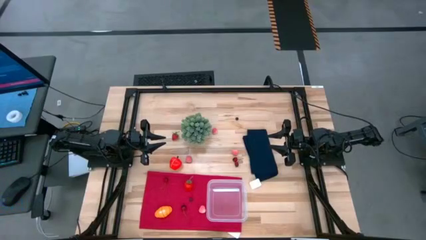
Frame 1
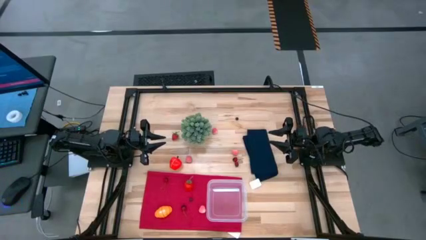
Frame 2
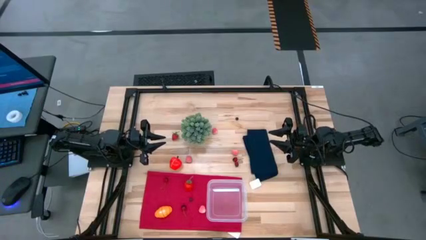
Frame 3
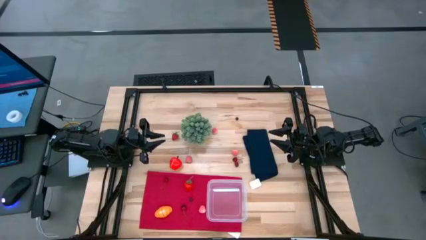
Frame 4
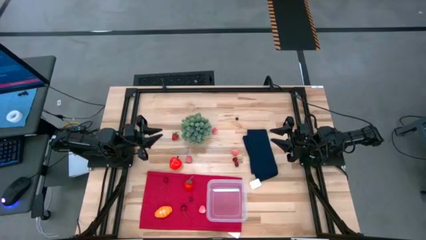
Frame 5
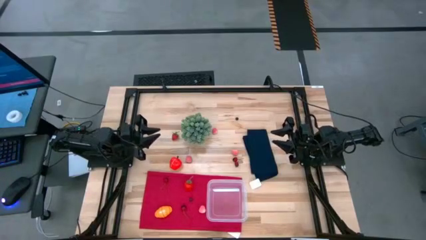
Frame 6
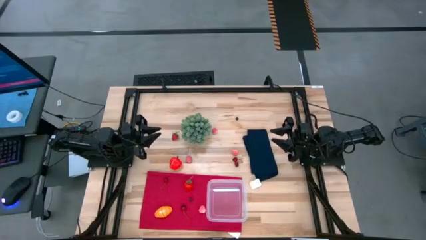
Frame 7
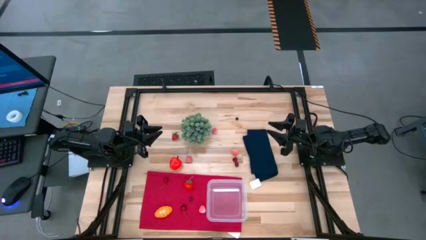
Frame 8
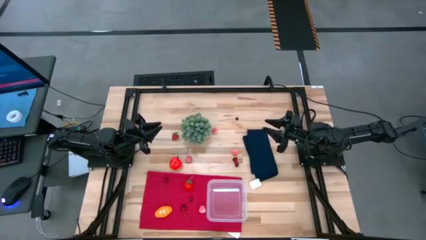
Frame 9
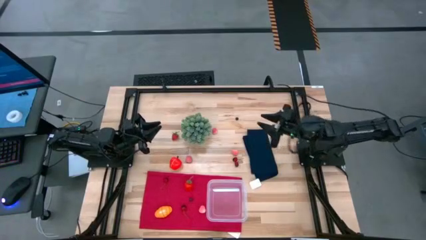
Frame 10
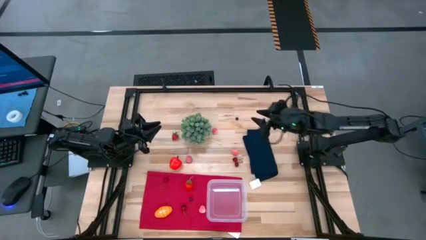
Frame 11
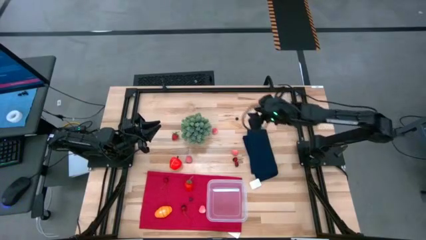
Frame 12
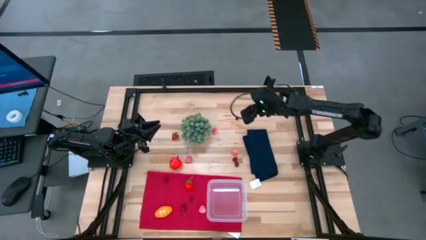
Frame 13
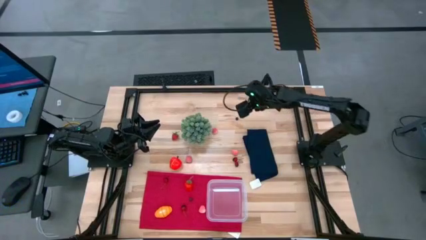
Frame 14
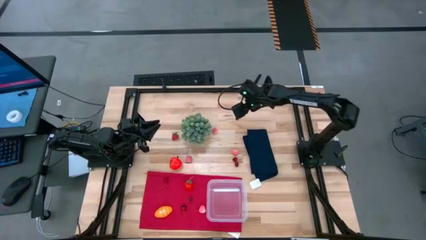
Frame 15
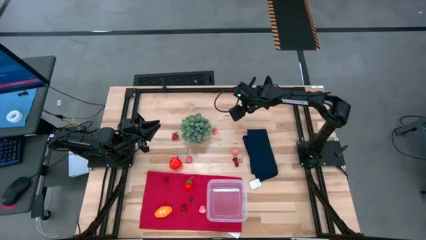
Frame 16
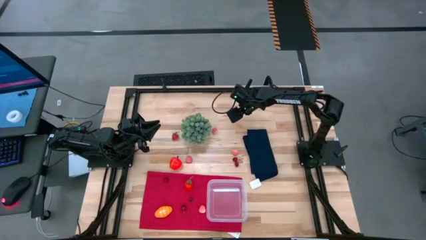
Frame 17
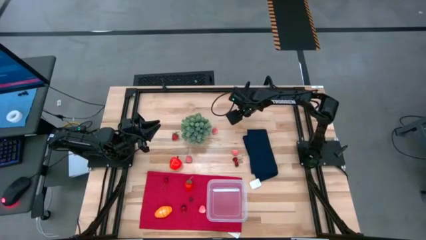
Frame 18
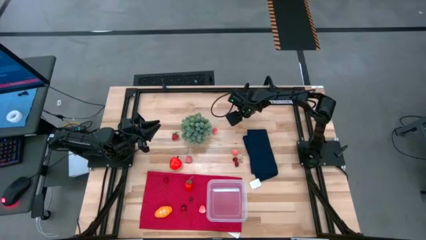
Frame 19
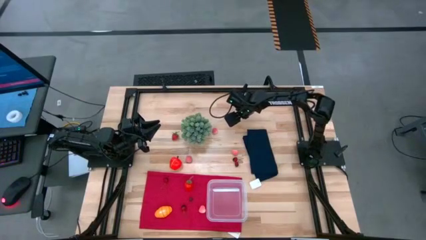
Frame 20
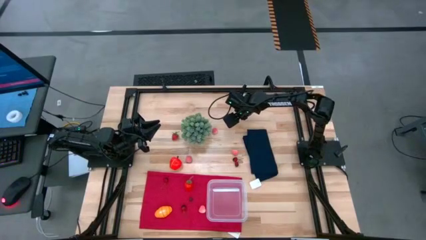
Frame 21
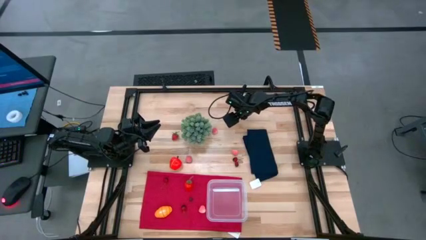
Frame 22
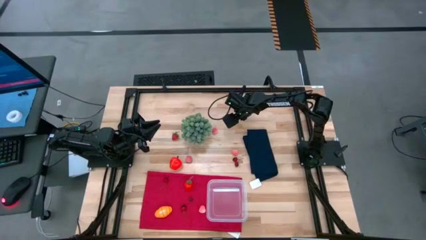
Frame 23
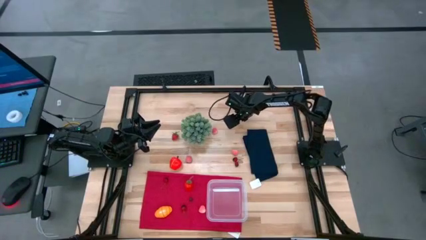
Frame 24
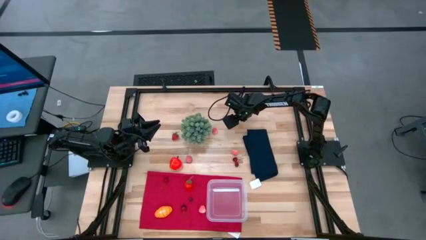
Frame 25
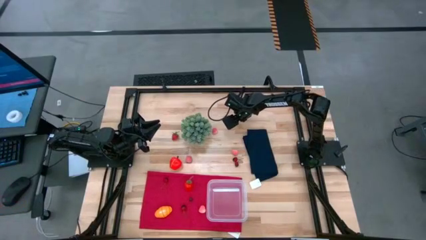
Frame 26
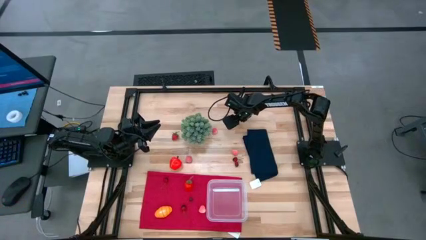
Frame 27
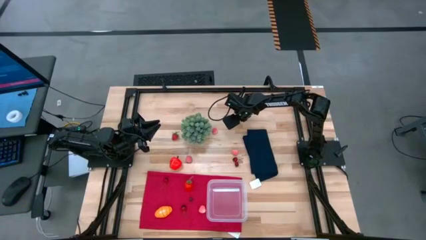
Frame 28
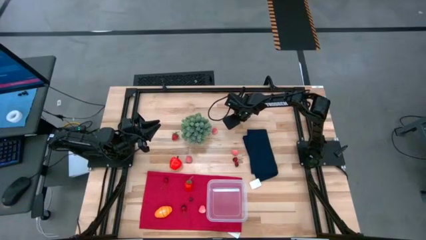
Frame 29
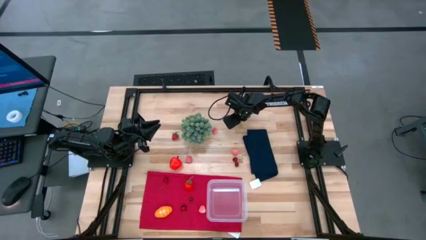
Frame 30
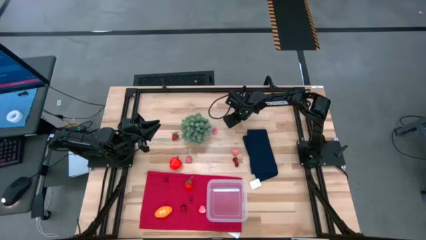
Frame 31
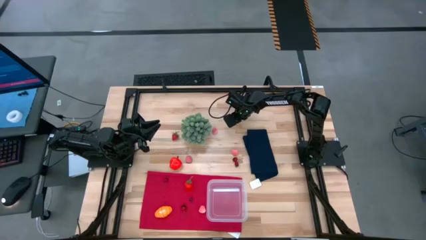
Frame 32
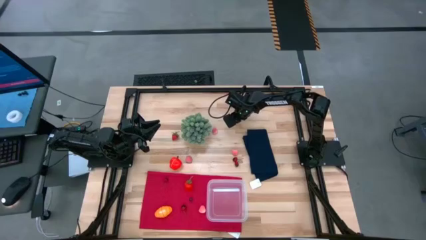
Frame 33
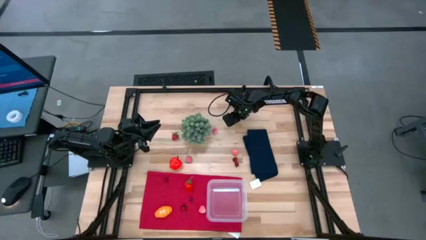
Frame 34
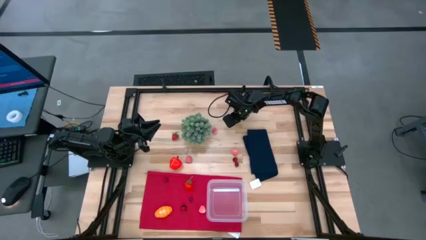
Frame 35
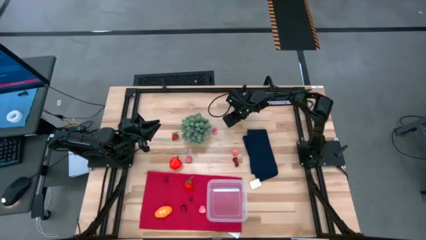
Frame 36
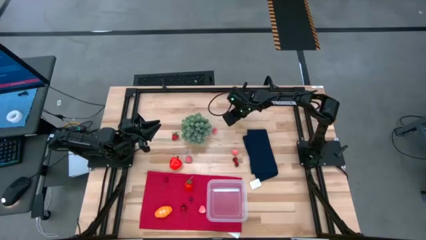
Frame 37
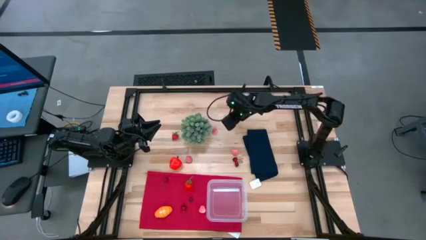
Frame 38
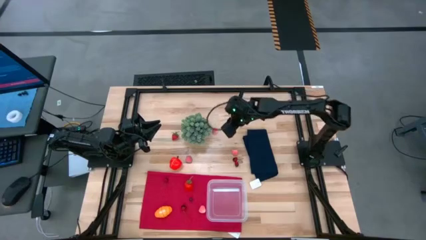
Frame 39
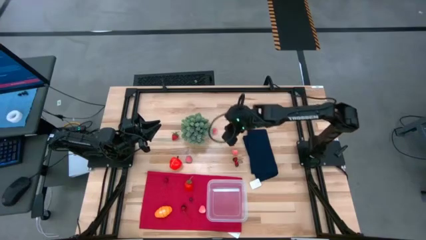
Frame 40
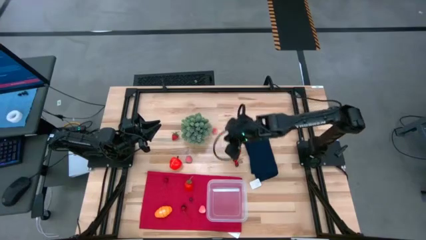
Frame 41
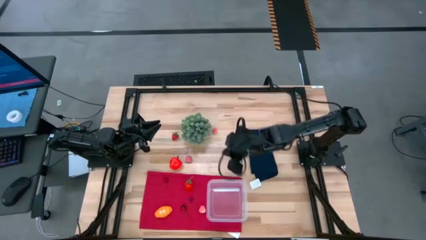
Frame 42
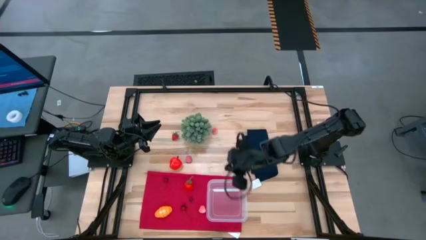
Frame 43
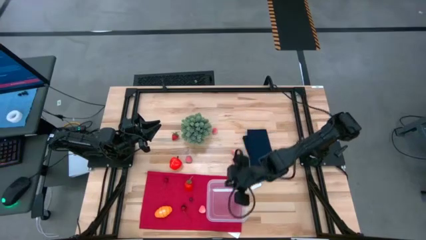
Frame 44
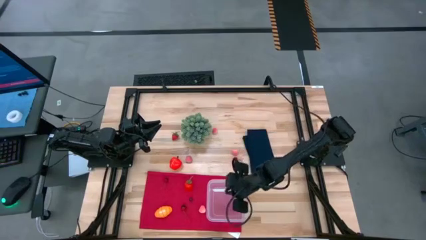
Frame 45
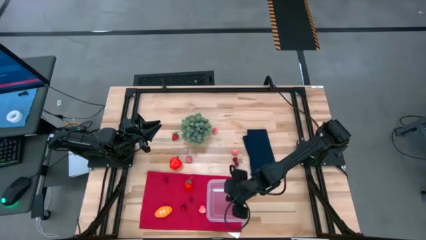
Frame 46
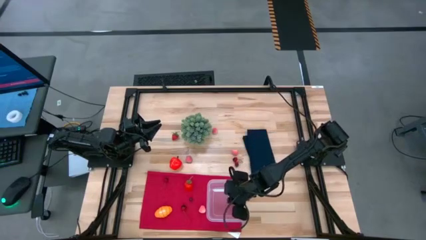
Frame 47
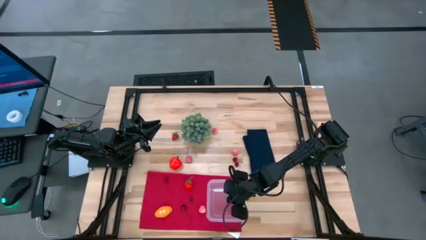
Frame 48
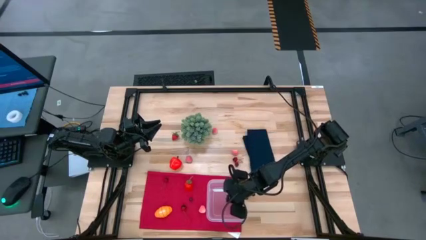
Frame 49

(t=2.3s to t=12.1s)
Task: Pick and placing Produce into tupperware
Put the top blueberry into the transparent bin

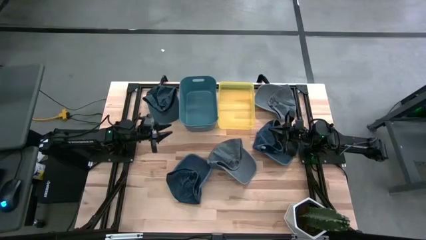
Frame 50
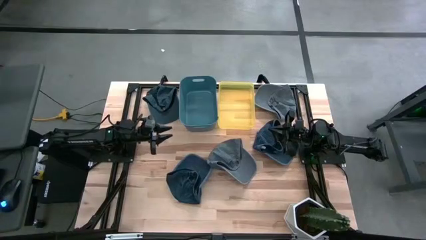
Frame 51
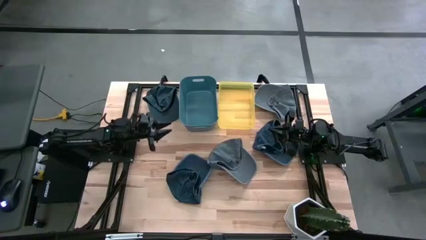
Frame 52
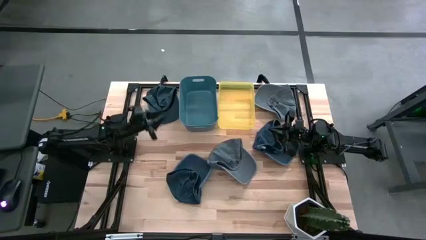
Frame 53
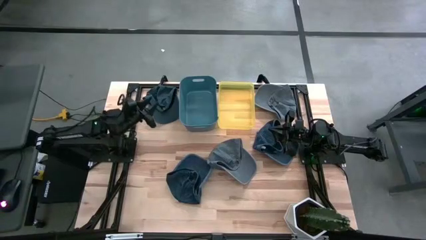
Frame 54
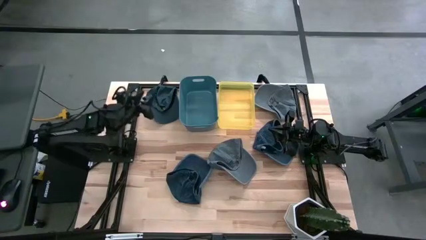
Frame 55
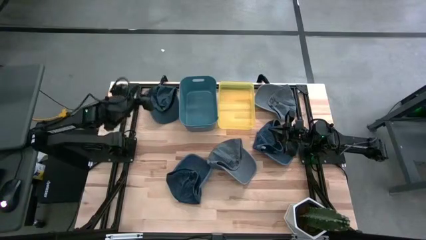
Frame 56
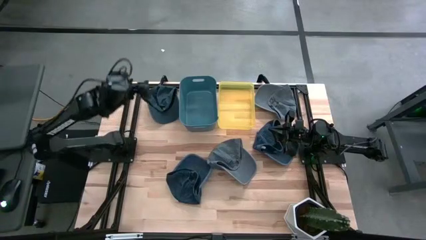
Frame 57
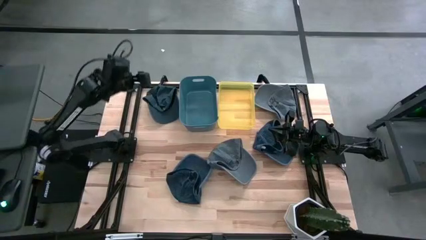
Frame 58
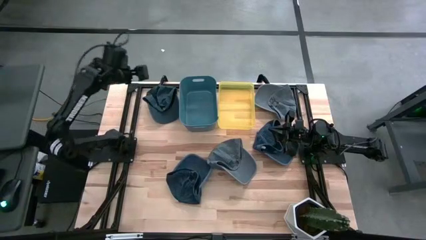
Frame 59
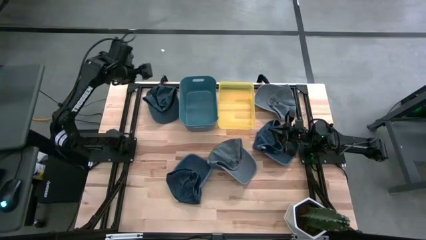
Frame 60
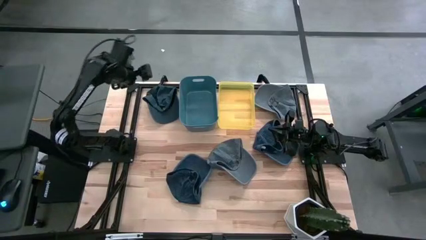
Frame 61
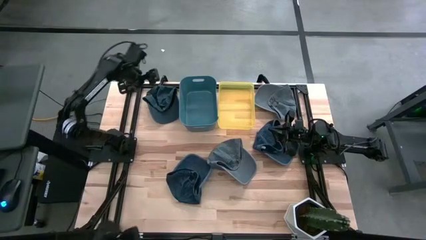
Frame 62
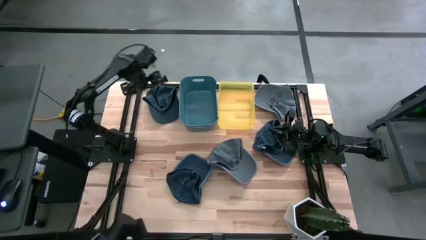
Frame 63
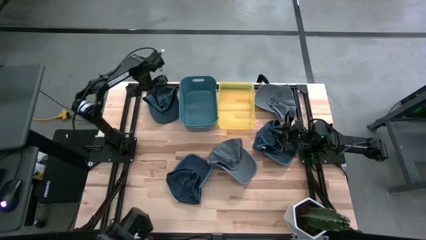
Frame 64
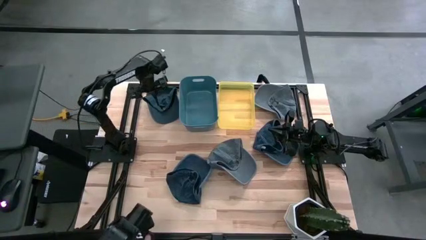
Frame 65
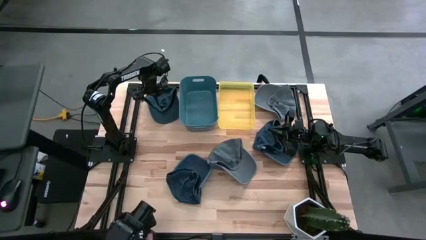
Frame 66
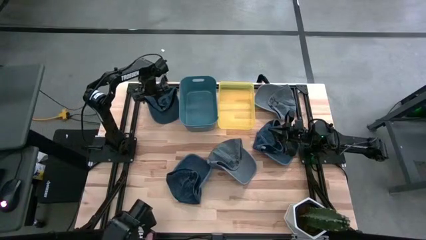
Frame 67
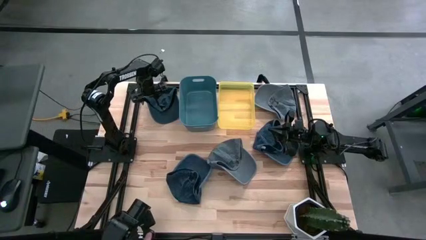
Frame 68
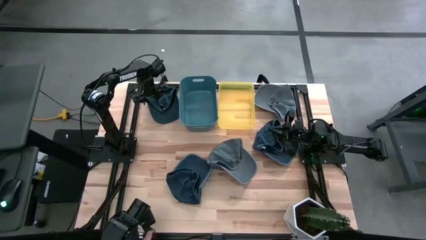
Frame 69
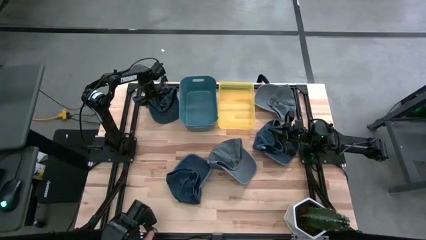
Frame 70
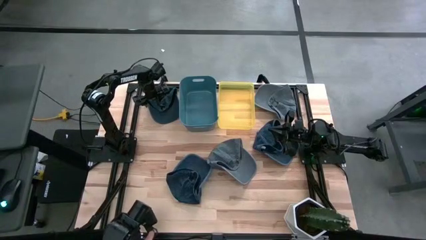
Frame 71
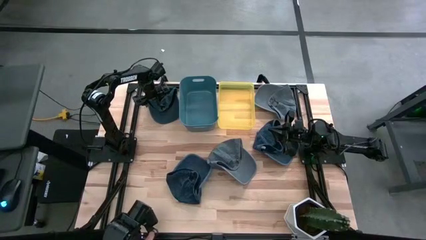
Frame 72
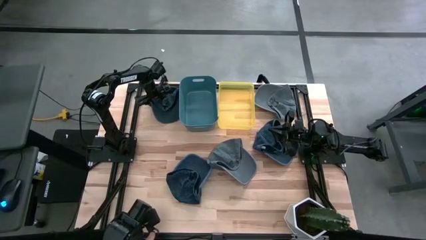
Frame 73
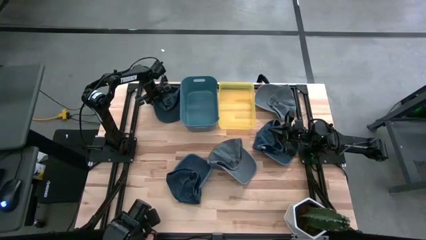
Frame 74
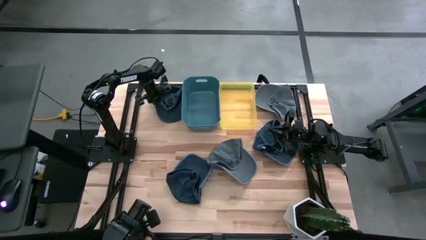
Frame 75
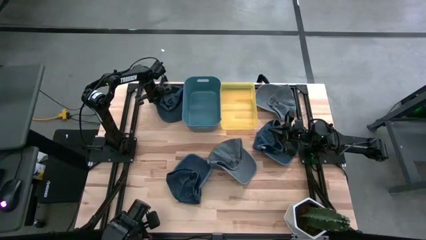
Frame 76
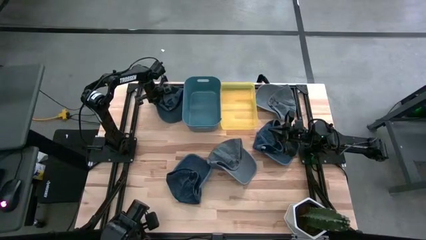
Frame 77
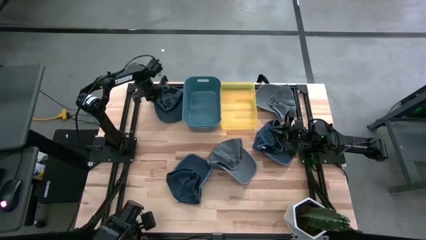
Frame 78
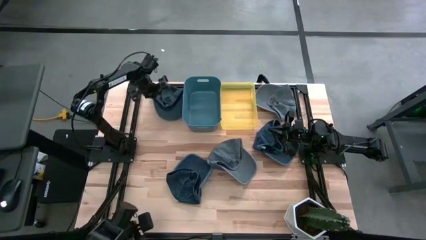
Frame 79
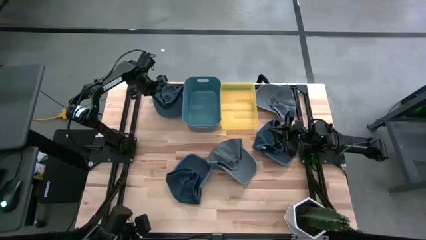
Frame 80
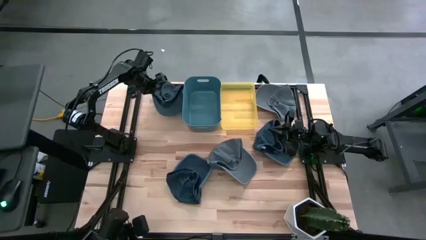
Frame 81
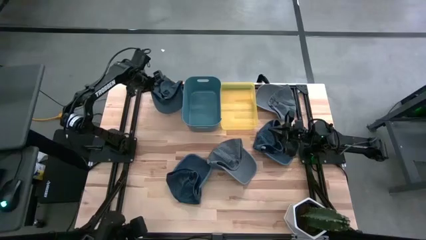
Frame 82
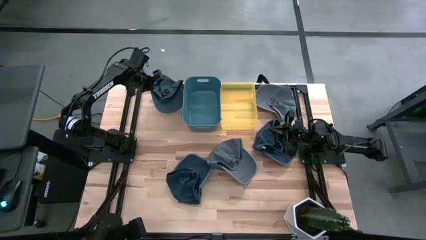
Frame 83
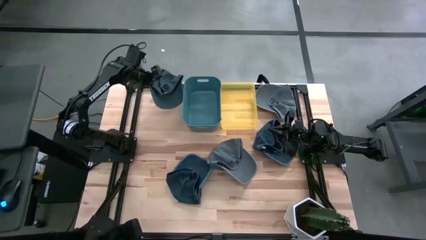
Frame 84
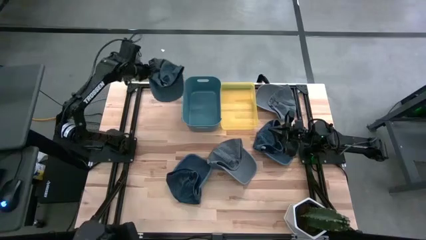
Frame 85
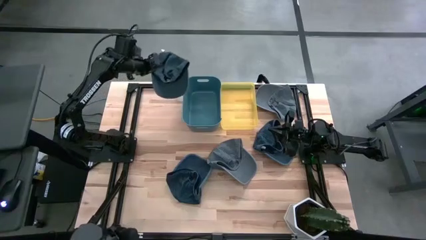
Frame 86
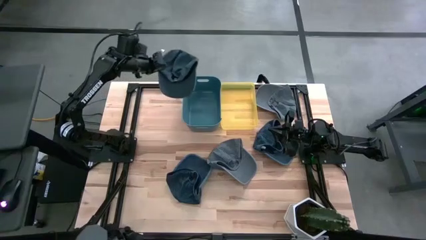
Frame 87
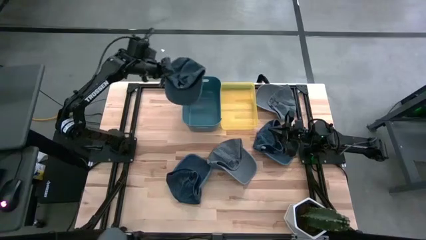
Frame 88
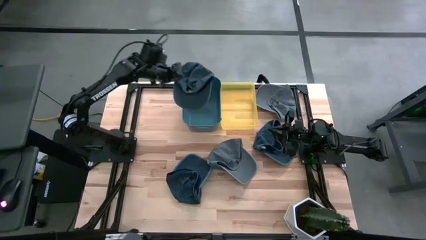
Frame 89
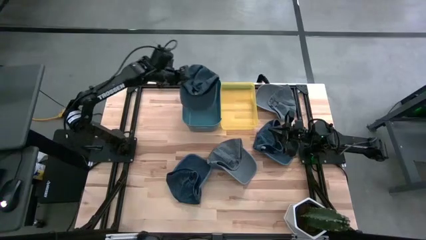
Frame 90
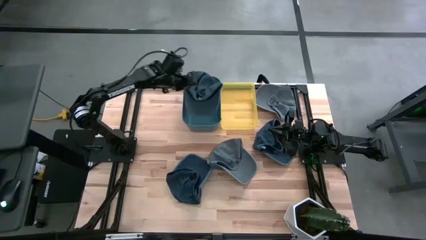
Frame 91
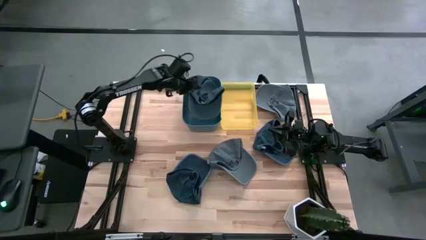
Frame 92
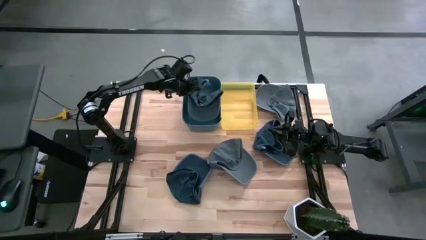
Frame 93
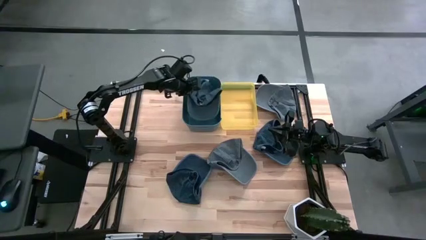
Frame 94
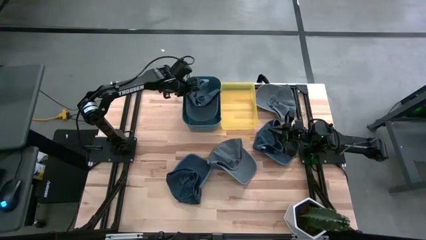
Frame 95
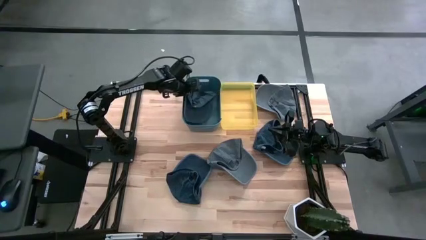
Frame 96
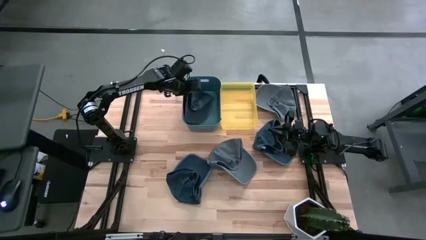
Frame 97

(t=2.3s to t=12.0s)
Task: Pick & Place hat
Put the top black cap into the blue bin
